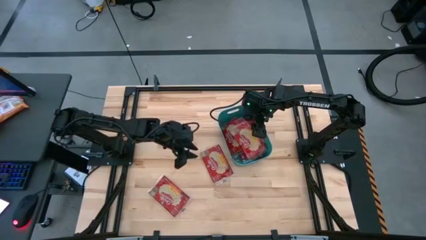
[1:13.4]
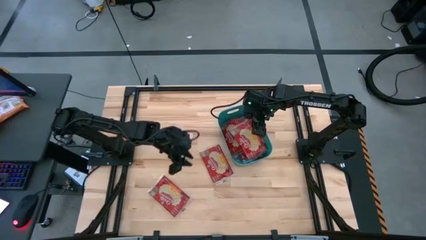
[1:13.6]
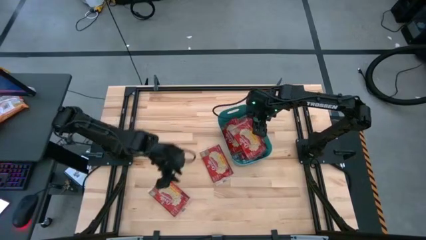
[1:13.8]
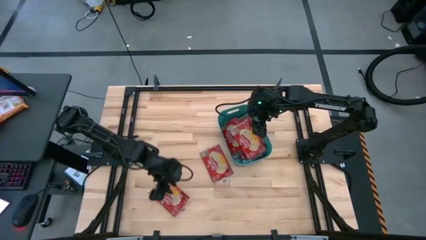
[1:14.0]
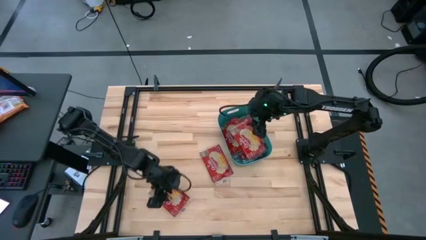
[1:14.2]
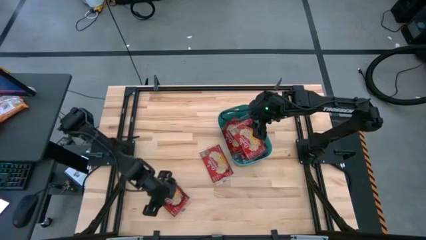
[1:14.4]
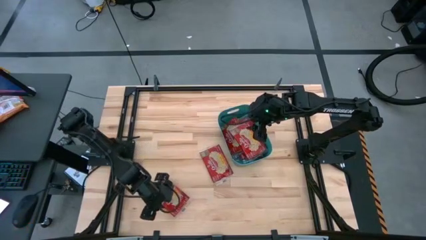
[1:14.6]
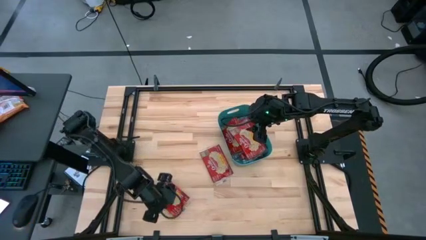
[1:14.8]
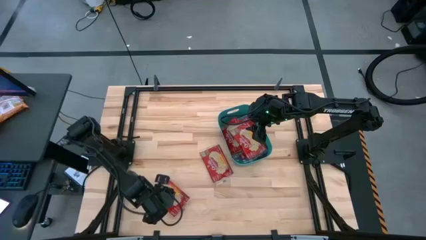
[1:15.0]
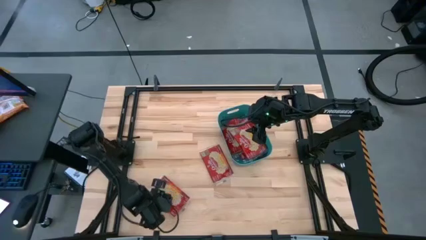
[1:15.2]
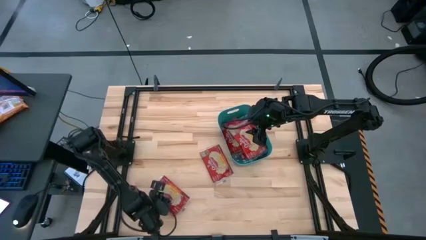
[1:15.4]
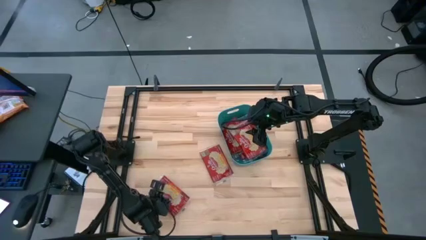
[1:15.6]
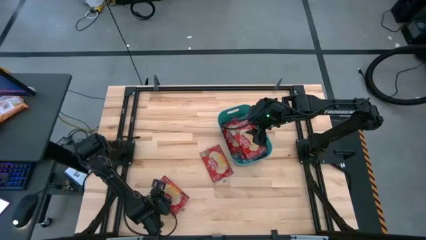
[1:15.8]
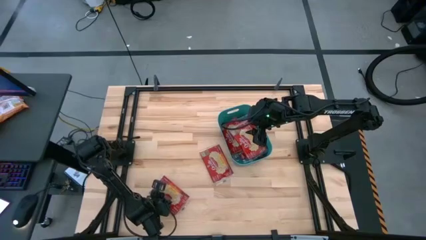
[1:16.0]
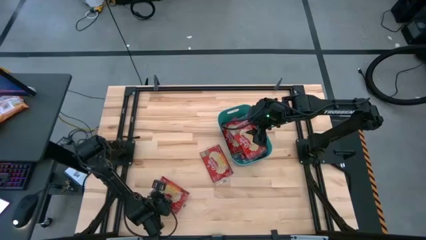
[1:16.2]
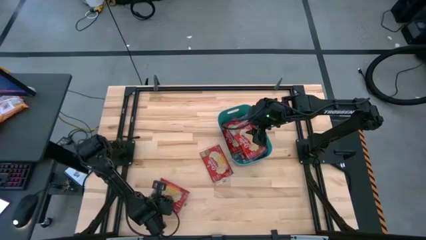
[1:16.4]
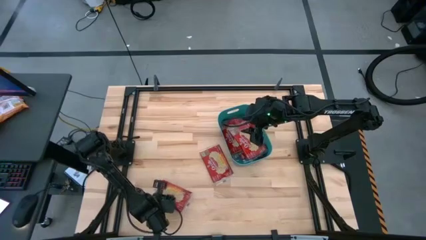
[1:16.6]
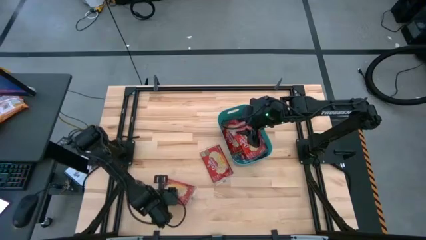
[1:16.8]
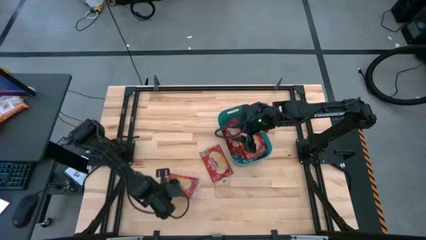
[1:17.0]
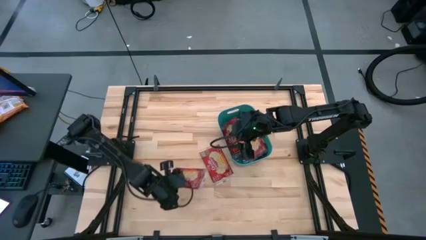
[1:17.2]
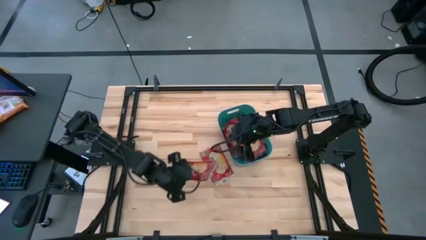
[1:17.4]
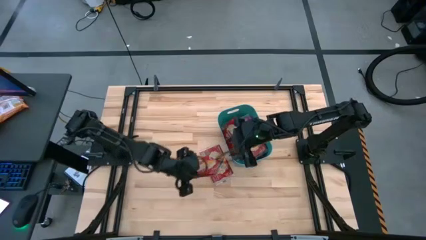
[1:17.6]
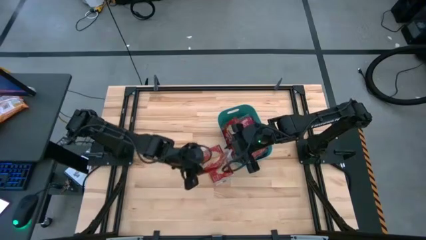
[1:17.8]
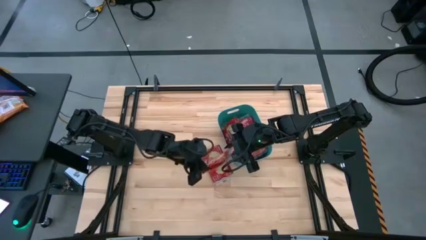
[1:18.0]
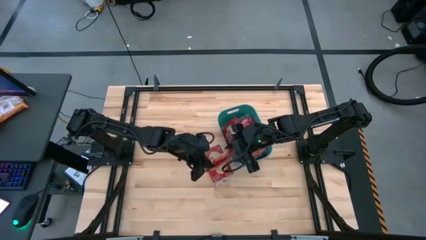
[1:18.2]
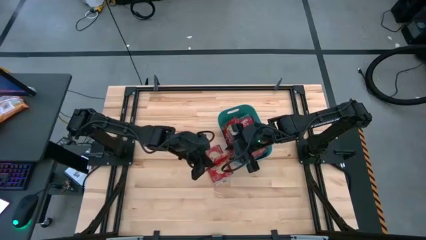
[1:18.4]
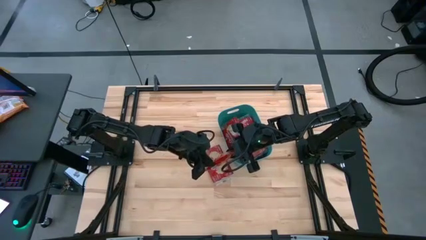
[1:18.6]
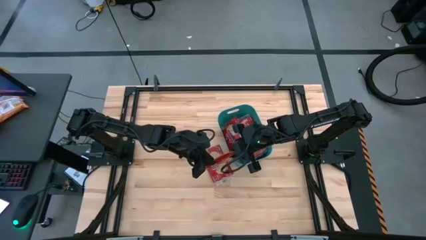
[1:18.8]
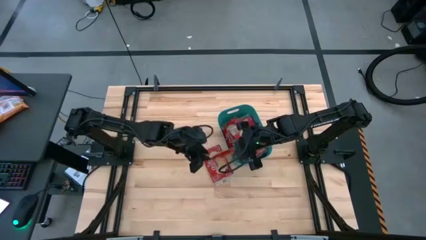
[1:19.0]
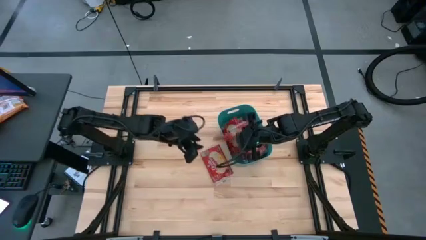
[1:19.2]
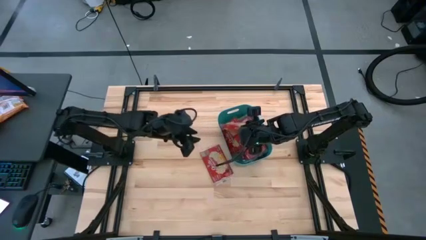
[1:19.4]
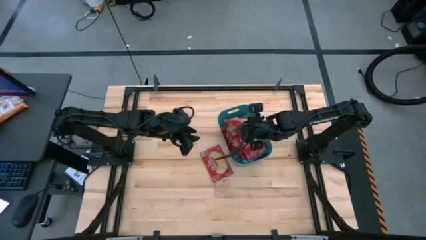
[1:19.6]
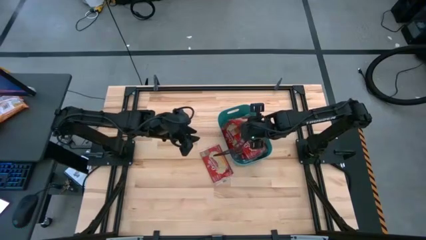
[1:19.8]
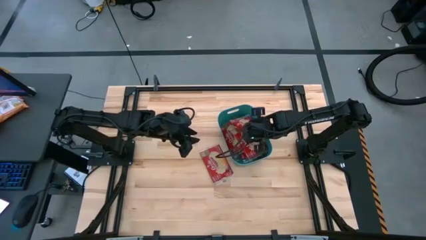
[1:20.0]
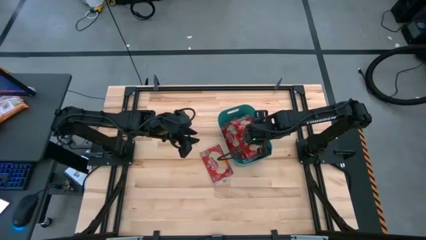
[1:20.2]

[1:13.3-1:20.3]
Task: Sort popcorn bags into baskets
Put the red popcorn pack into the green bin

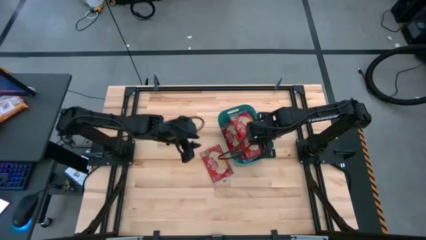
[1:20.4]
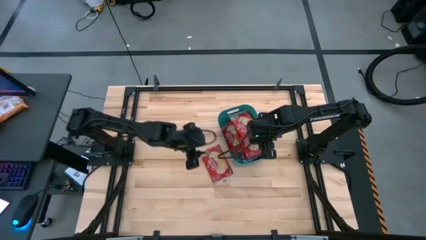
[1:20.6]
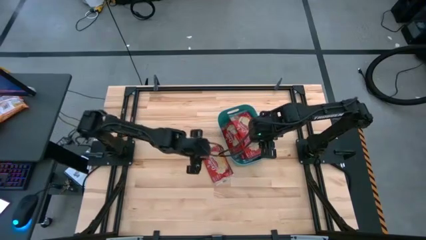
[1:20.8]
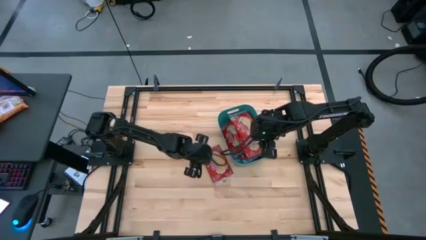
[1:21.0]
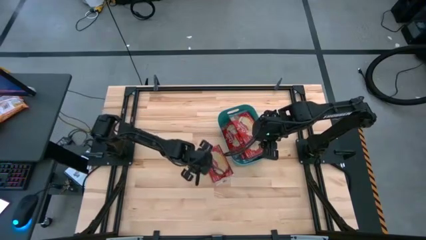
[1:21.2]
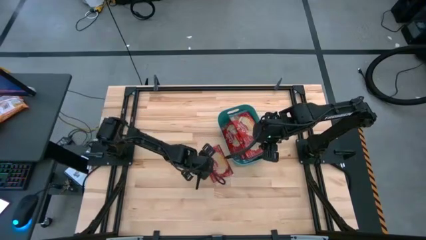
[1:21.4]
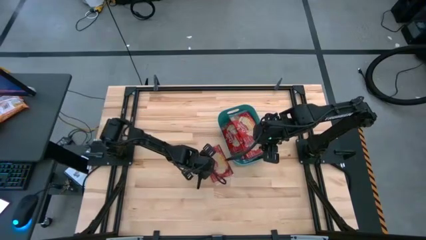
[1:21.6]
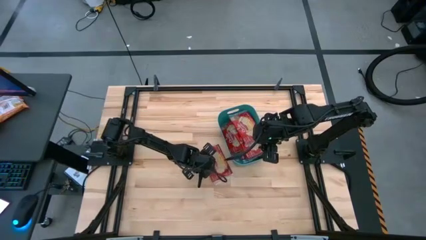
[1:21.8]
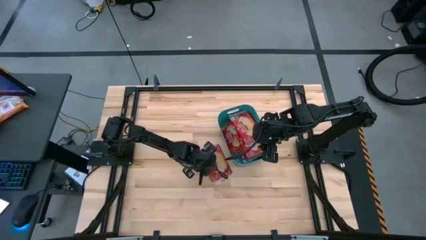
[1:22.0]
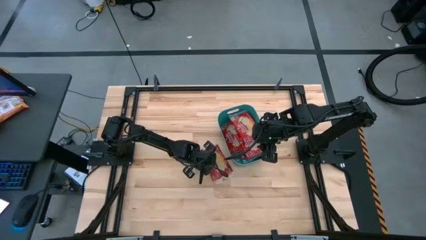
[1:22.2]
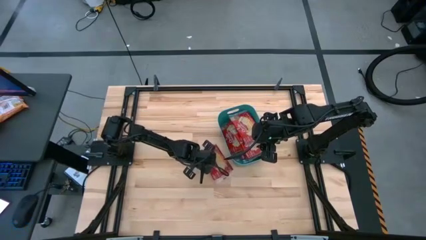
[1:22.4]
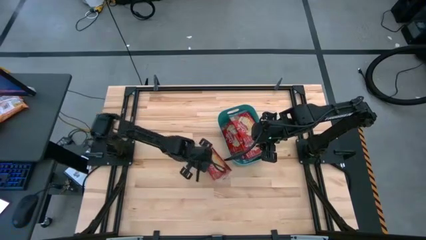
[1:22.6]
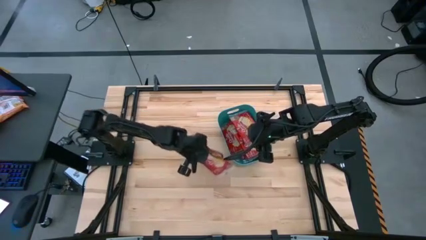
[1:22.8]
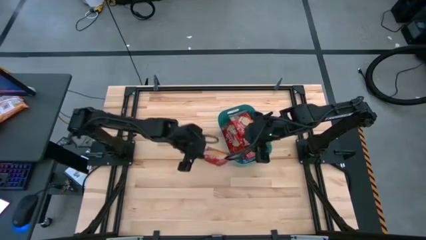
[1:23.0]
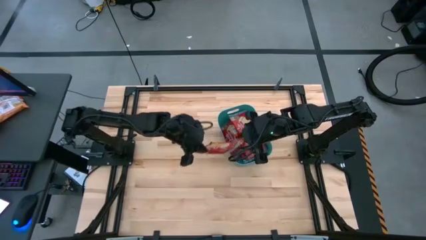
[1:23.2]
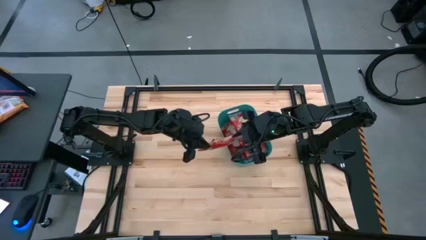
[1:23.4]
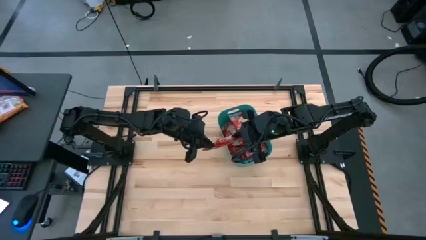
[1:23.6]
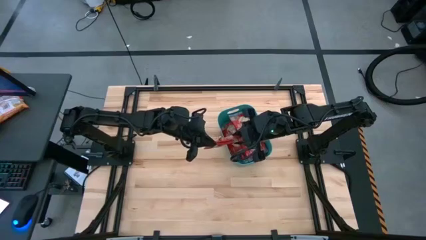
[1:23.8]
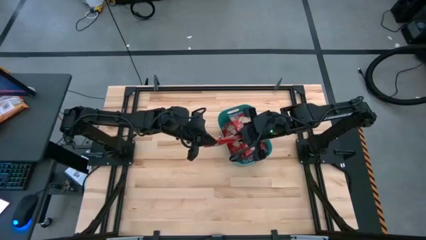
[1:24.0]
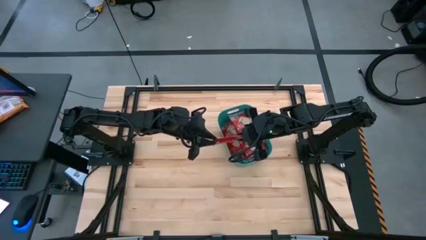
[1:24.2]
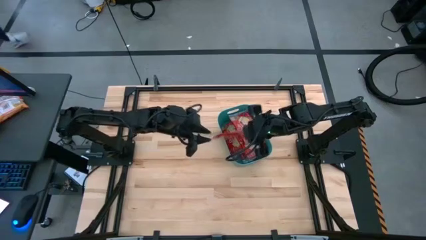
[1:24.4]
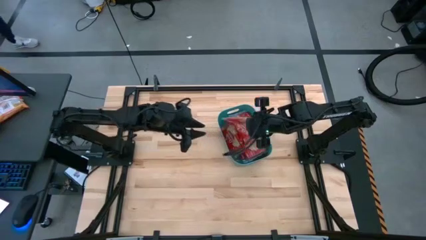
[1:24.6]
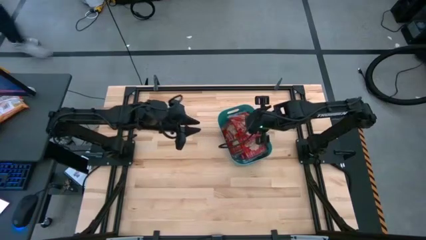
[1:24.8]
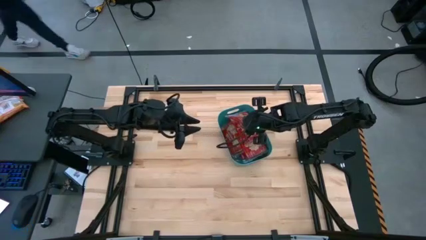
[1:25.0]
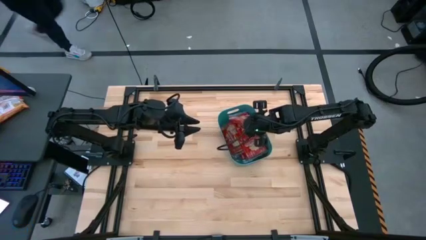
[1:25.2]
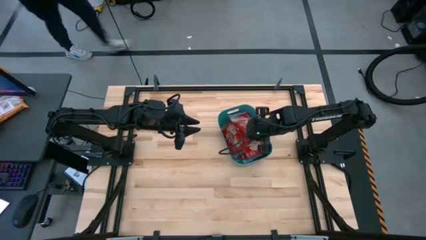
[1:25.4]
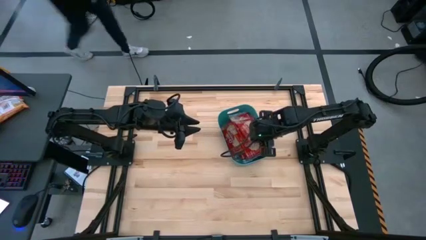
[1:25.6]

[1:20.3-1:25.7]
Put the red popcorn pack into the green bin

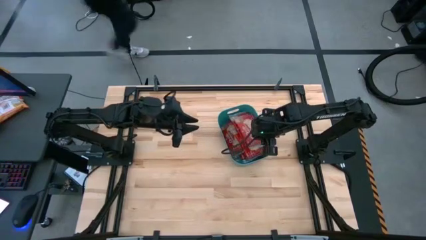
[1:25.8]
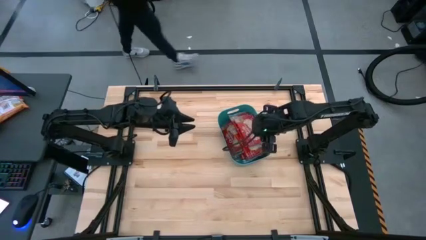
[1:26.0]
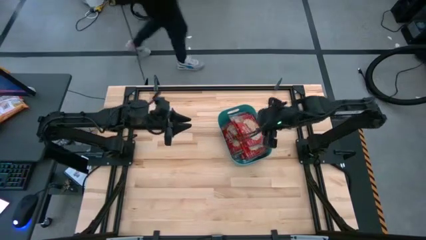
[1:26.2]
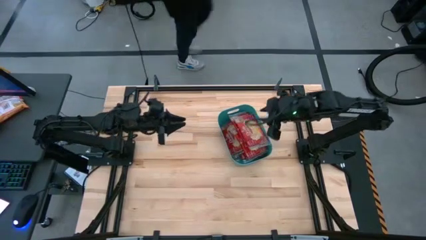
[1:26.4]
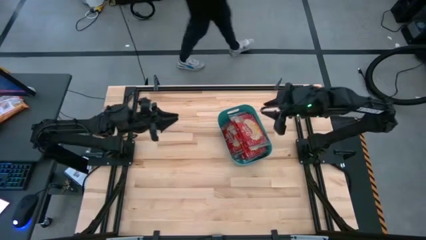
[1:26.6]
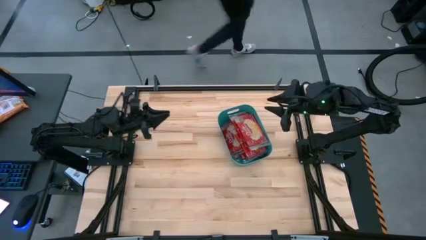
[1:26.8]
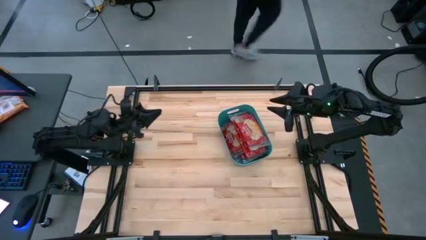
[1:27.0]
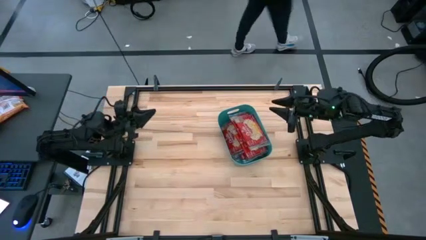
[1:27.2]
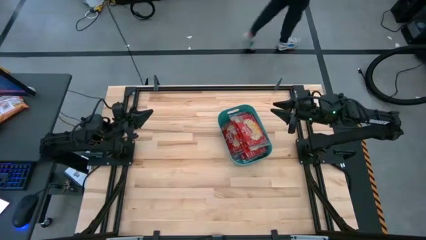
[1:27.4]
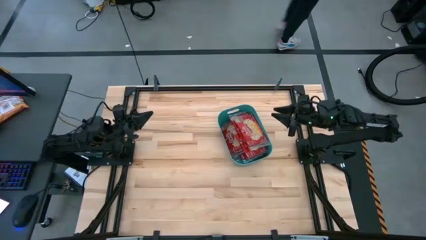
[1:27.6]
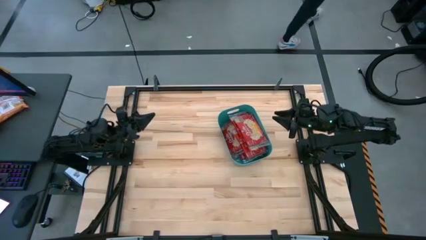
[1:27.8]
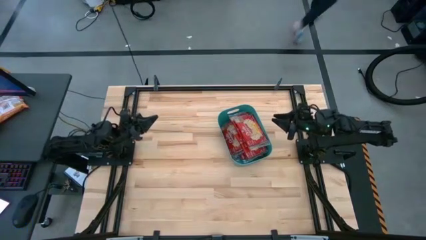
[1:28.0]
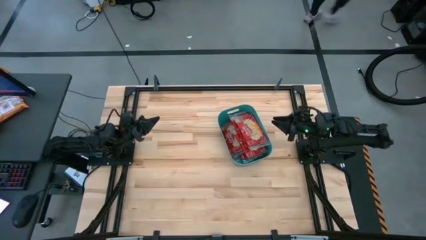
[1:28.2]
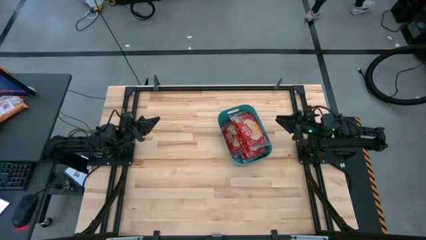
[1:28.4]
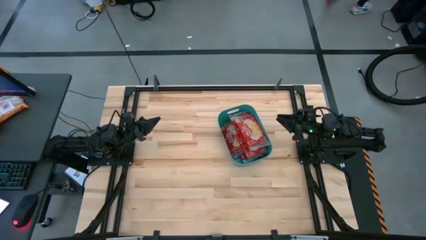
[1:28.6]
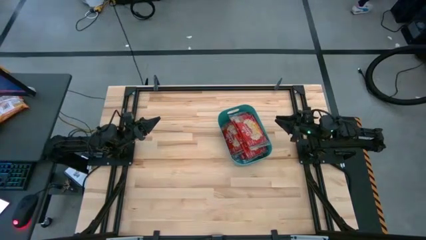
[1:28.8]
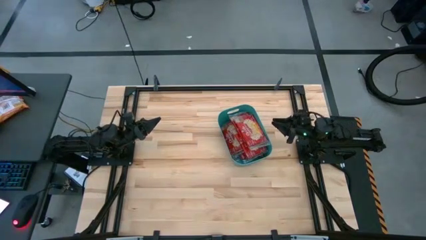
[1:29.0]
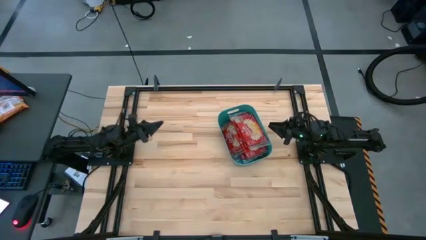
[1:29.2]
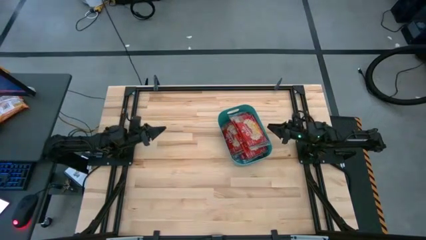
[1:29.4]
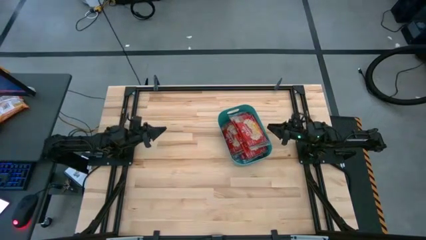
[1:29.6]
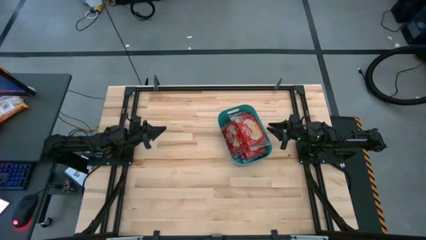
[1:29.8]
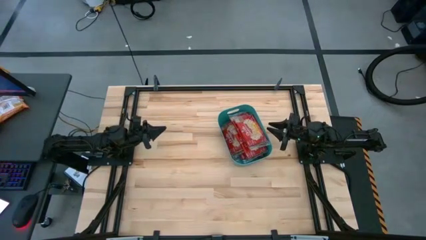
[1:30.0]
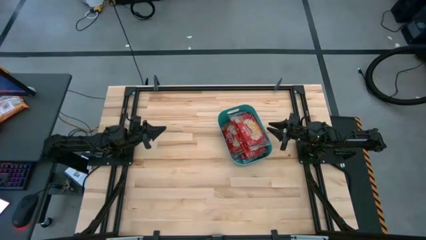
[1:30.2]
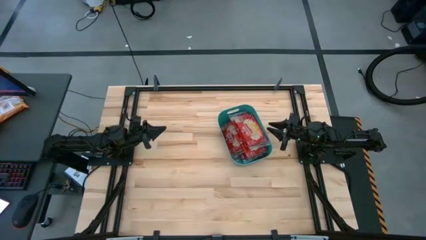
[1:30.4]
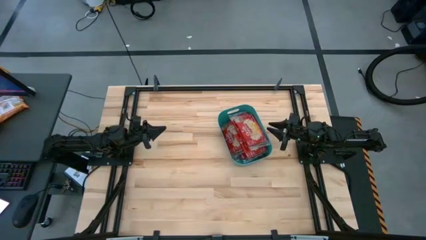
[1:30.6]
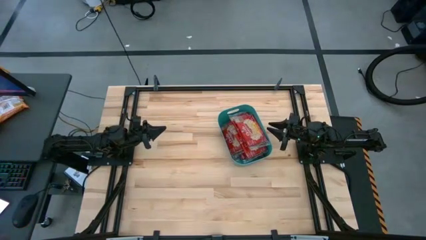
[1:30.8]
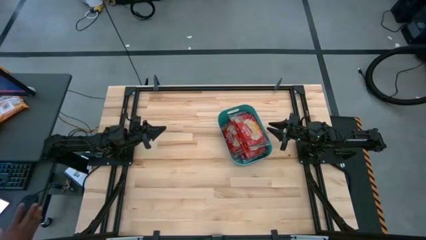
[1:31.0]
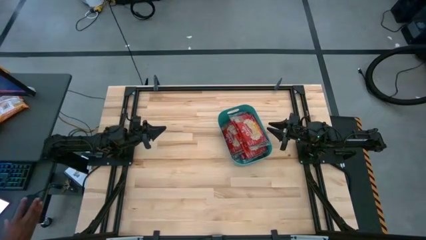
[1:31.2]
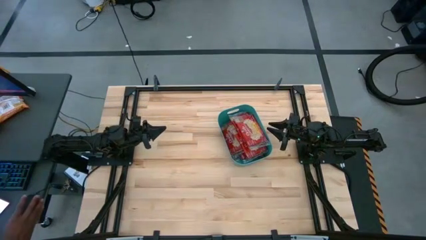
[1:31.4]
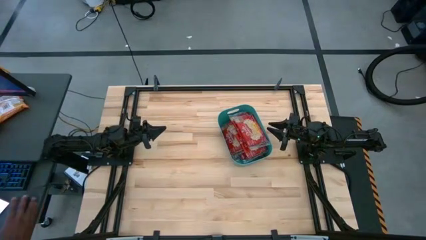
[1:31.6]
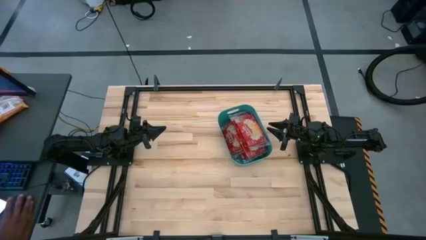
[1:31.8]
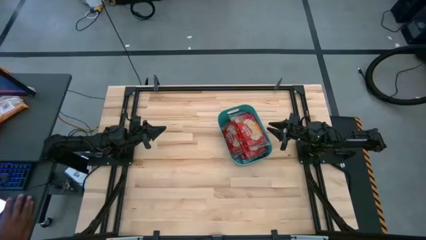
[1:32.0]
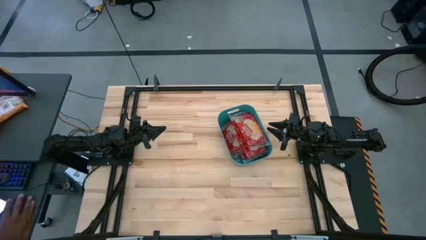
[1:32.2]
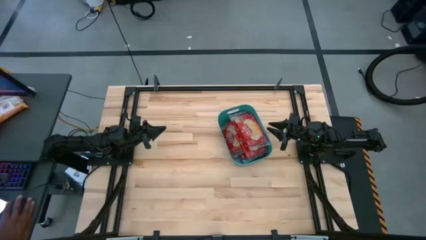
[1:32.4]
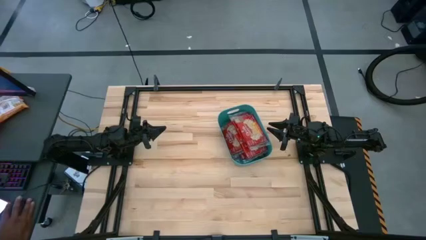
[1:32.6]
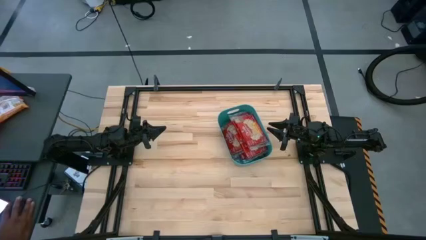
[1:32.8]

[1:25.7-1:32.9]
Return to Home Position
